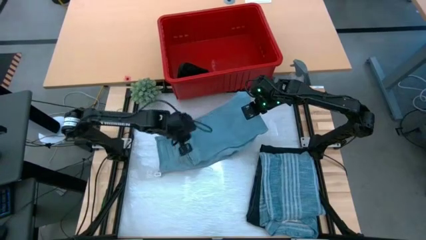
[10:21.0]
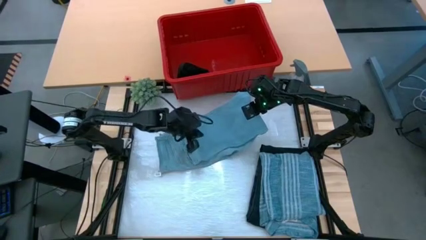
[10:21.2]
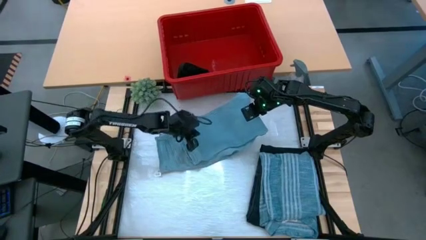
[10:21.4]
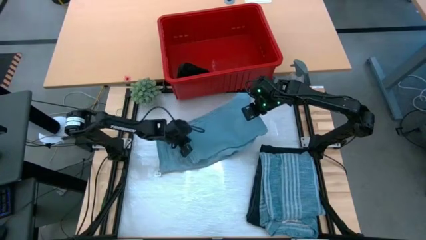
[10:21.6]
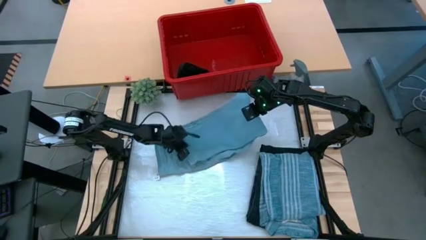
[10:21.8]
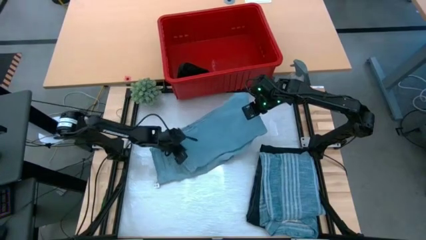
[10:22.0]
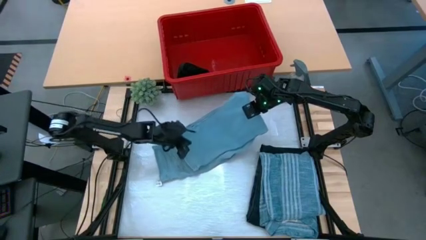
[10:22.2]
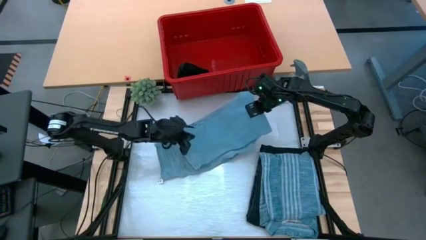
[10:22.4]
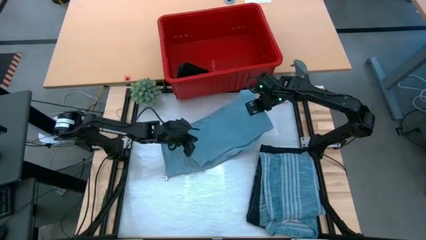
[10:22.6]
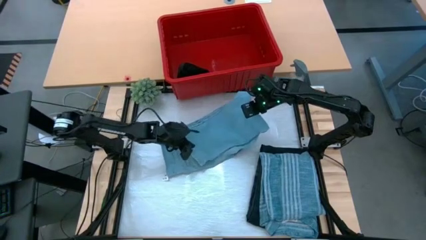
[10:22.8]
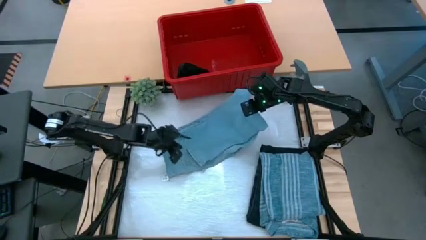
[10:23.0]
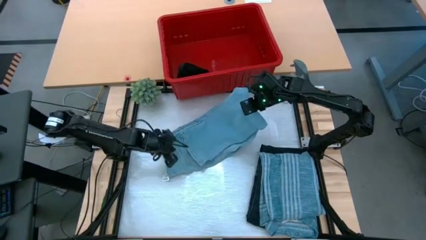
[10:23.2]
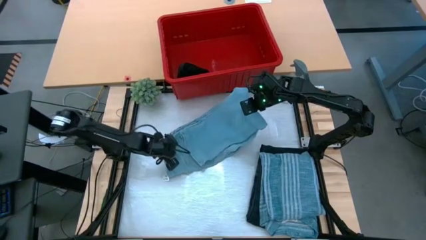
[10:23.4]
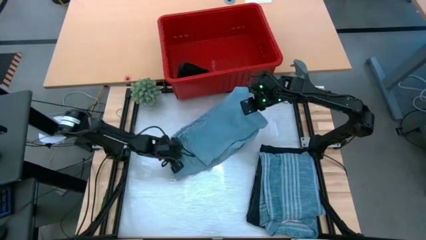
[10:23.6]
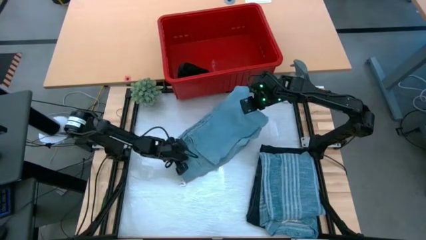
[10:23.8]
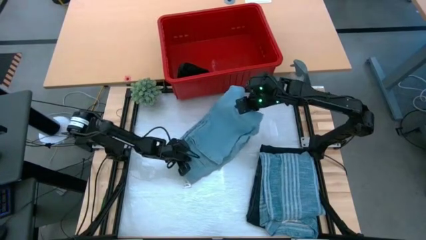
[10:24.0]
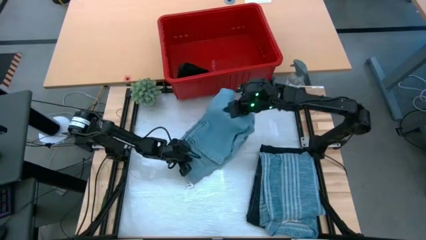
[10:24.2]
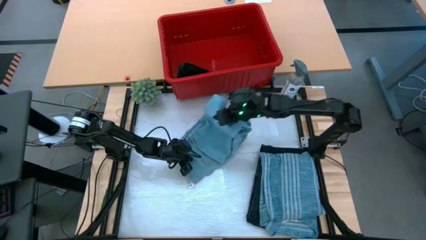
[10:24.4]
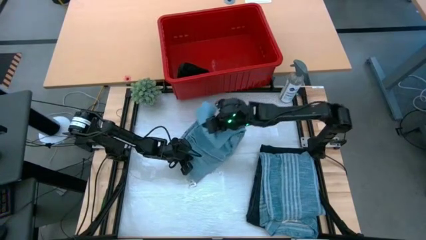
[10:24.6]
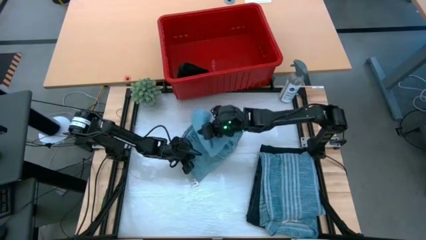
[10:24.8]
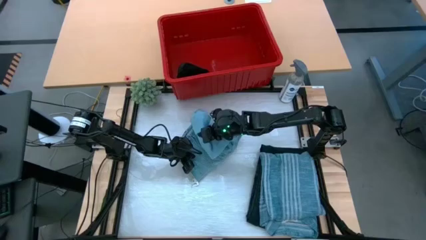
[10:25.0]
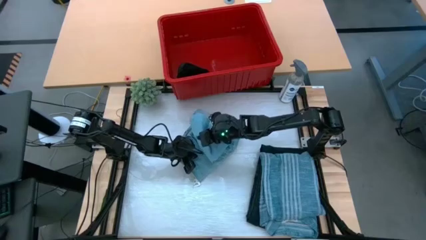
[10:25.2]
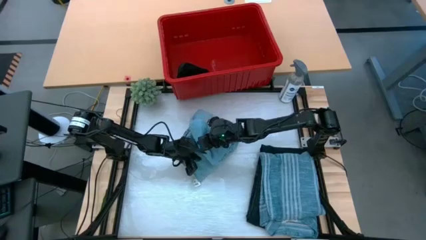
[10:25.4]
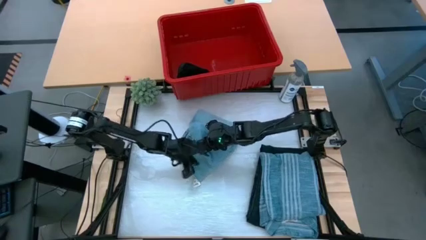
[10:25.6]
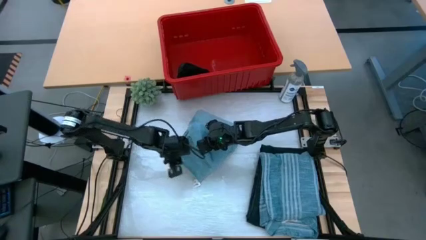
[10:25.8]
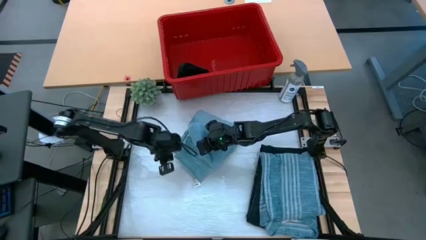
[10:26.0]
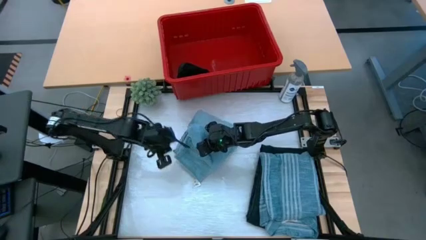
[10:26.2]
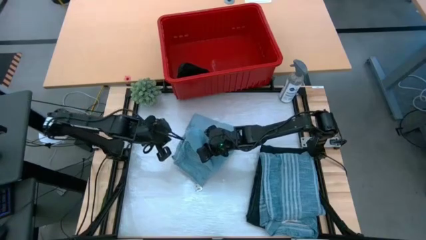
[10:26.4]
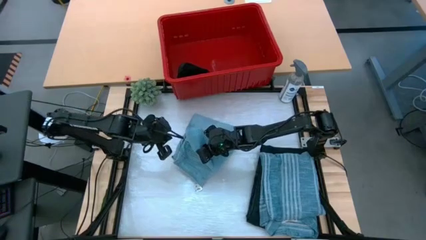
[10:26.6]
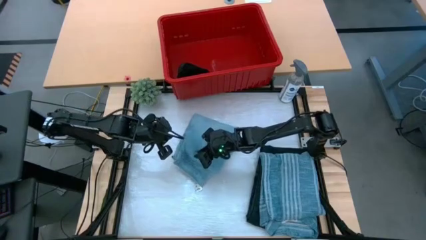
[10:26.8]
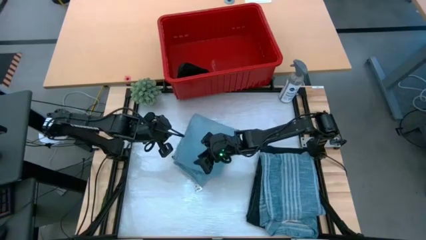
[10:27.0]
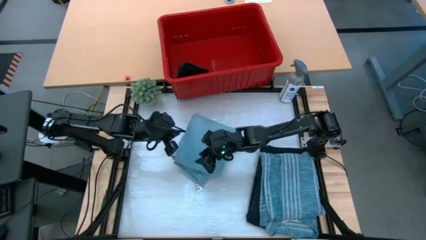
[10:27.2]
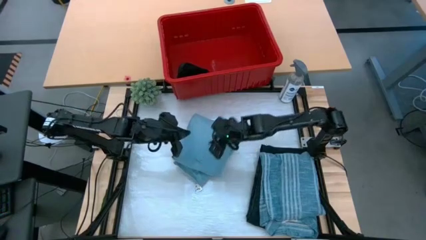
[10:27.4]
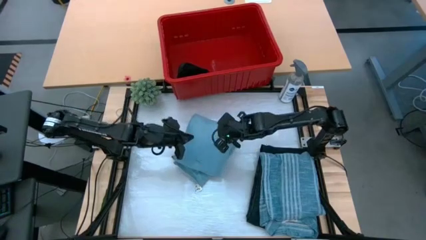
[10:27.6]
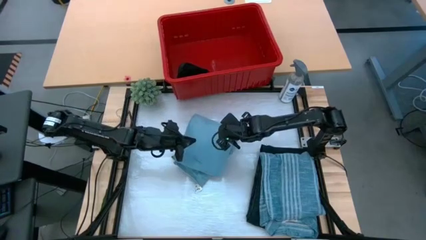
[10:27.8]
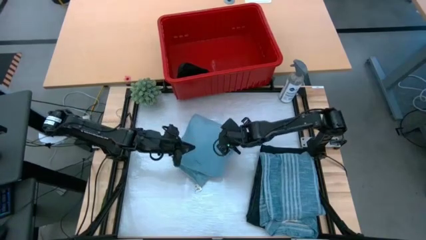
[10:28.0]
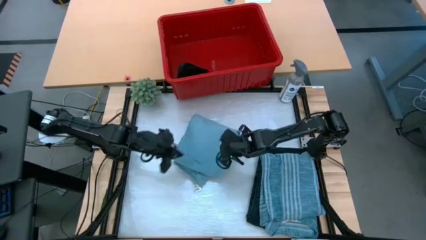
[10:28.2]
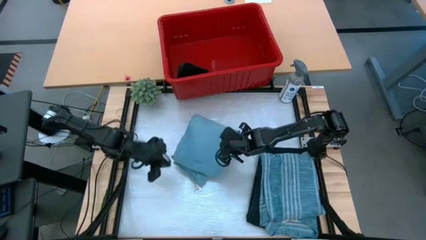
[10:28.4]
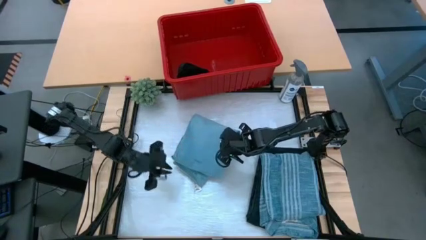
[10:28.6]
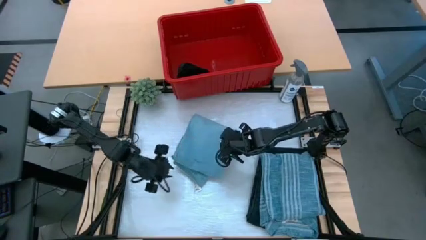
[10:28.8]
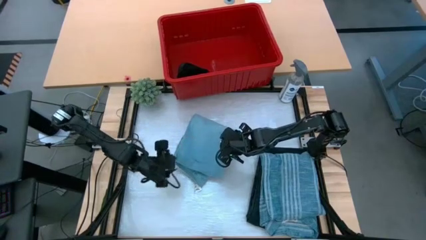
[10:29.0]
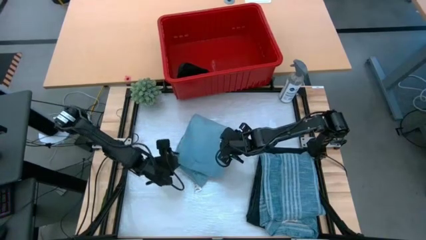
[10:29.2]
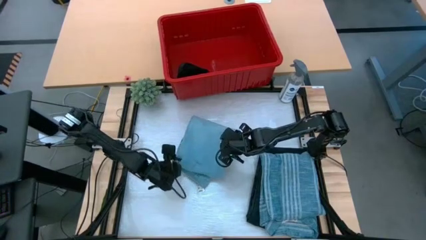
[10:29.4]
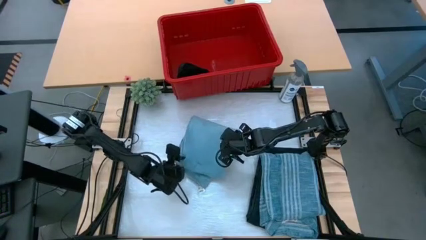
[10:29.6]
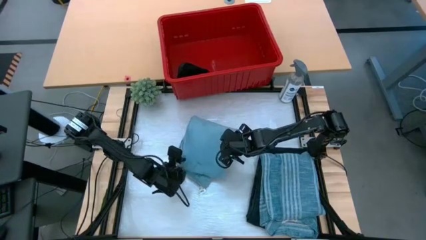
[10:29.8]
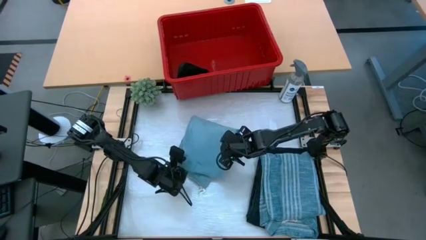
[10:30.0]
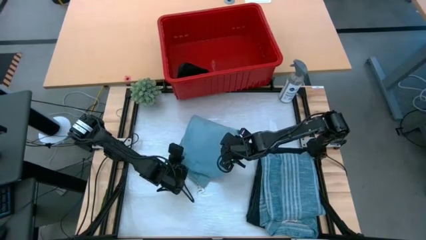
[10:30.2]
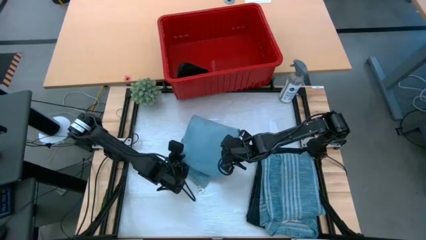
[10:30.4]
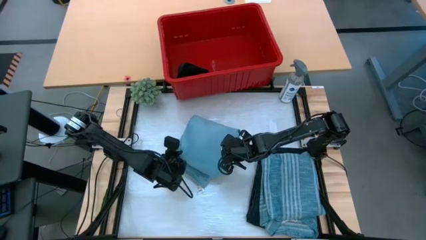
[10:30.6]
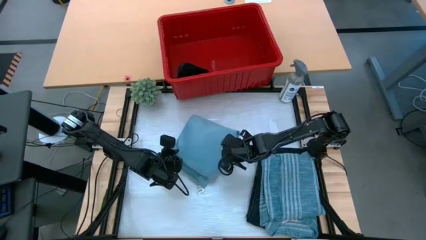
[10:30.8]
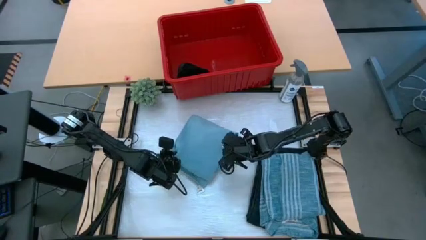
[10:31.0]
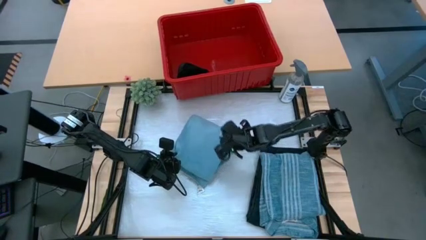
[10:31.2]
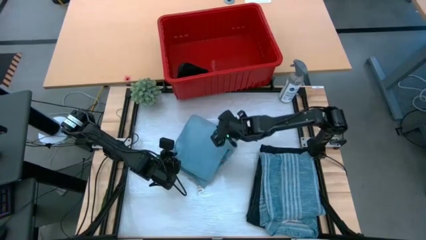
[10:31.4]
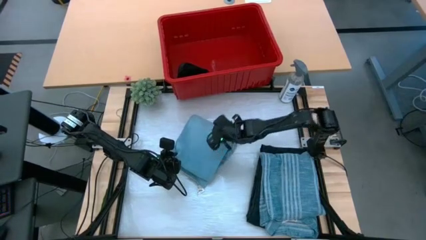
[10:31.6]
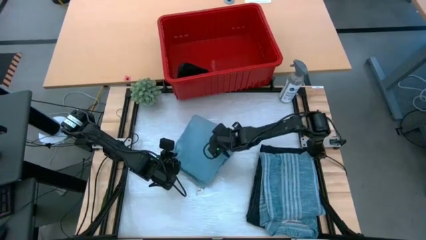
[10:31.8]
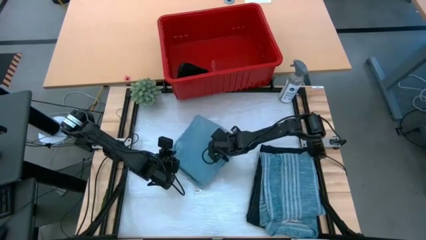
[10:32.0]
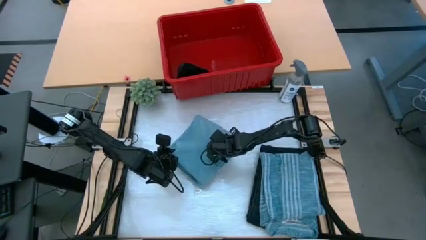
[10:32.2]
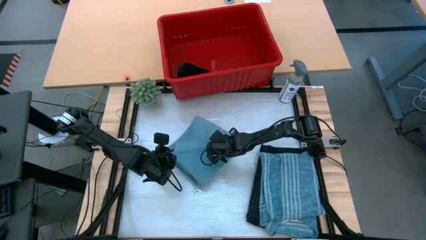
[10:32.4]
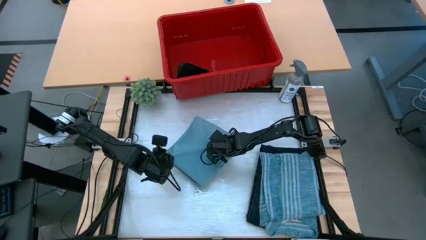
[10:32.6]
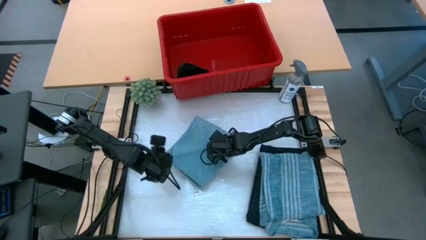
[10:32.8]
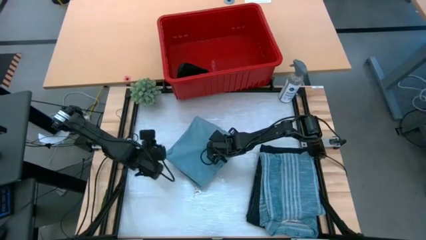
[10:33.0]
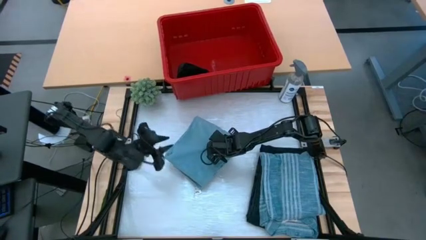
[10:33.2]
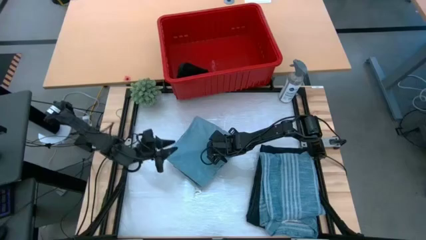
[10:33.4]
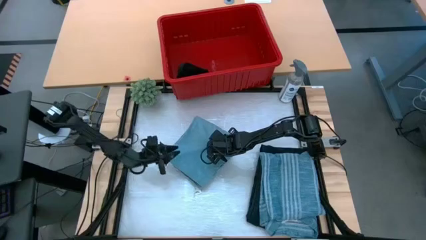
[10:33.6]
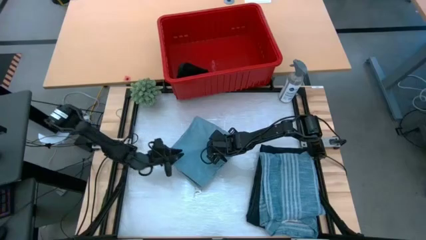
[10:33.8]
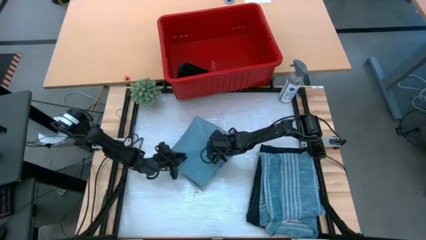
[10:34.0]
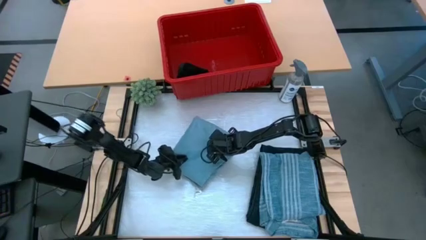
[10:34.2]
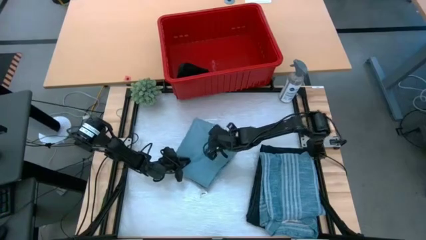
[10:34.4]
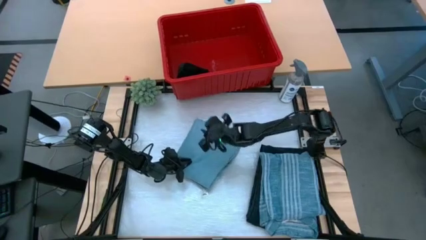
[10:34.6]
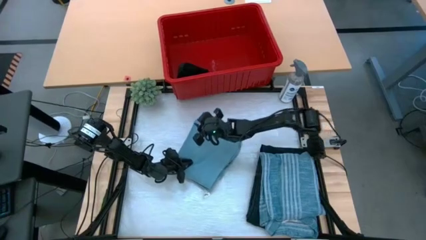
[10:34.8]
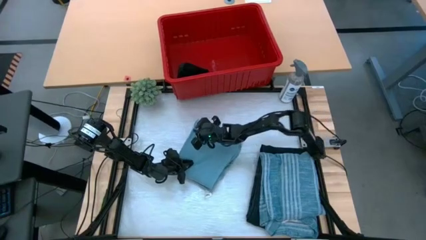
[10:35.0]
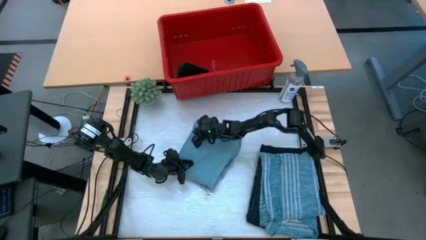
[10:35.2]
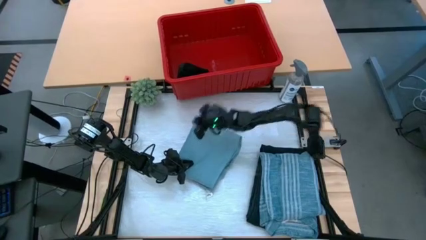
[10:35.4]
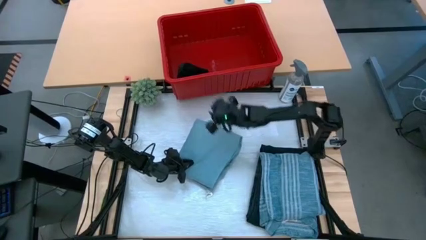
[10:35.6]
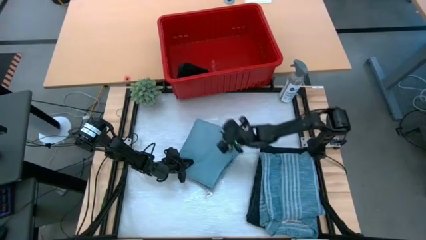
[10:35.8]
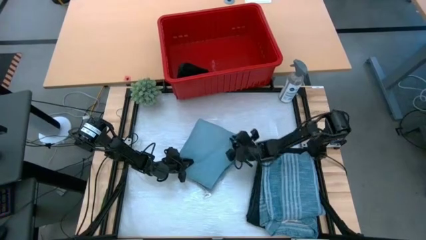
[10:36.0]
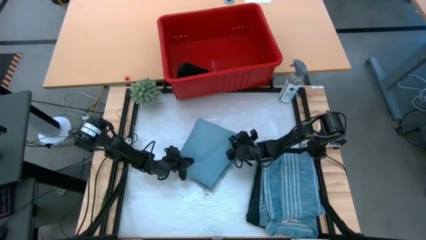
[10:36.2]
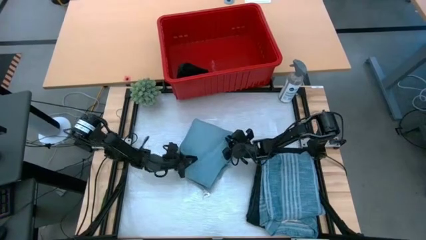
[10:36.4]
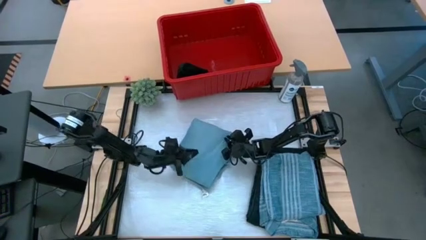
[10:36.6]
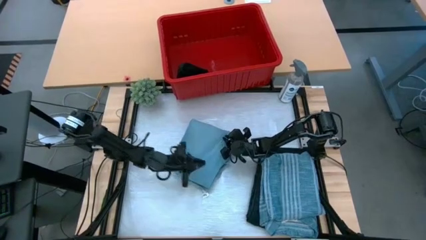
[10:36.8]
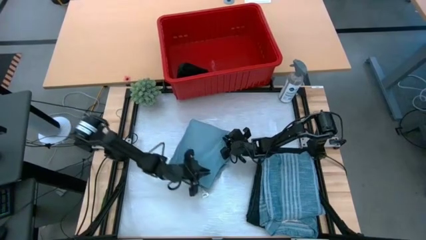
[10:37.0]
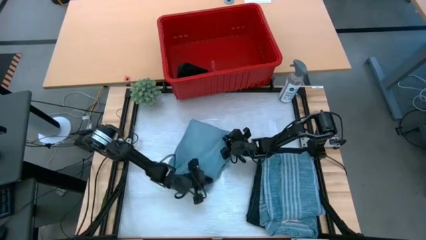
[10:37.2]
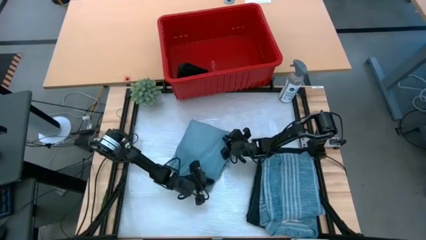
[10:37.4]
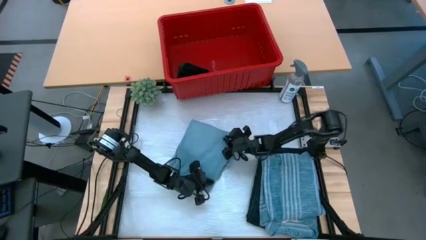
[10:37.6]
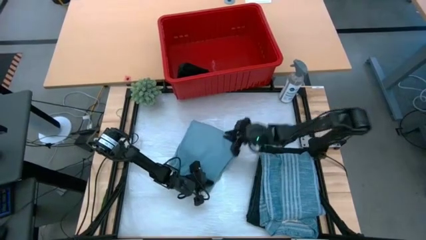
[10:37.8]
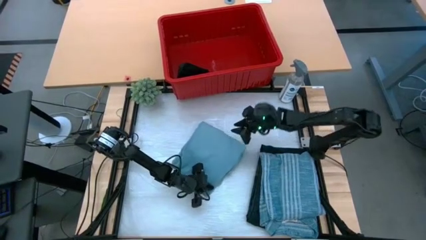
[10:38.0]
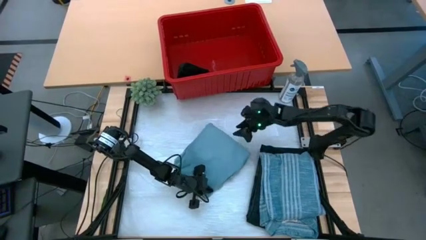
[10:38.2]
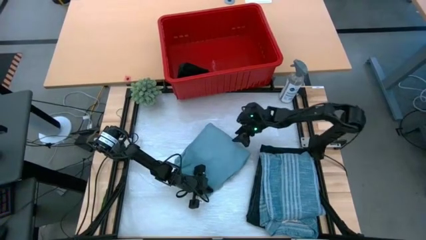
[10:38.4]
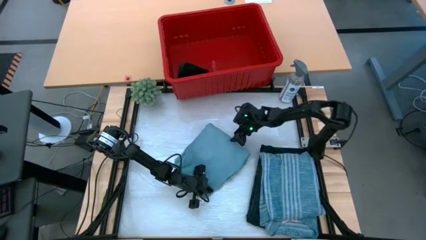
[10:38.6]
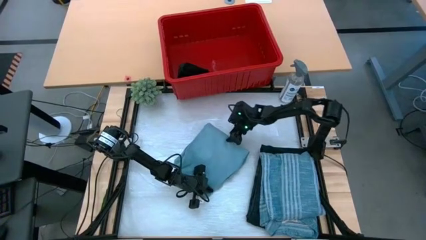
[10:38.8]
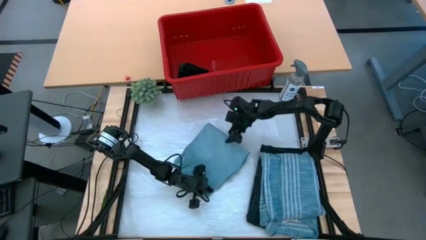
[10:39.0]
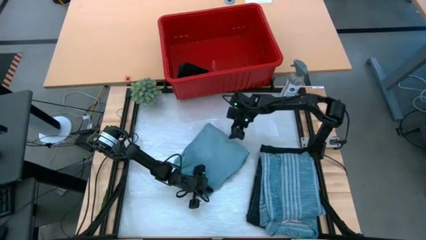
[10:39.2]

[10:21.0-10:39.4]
Task: Fold Laundry from Bin
Fold the light blue denim pants
